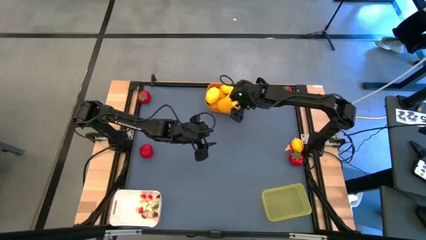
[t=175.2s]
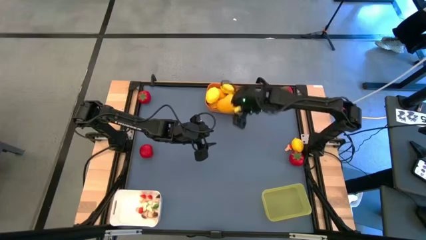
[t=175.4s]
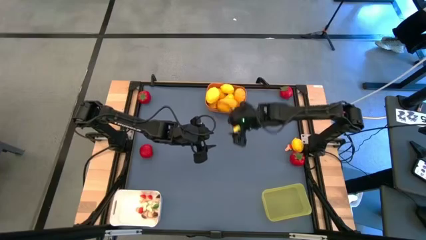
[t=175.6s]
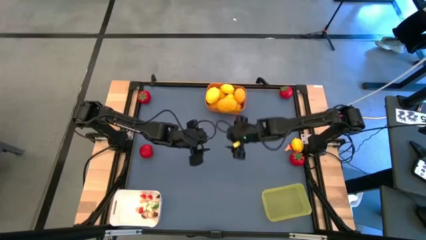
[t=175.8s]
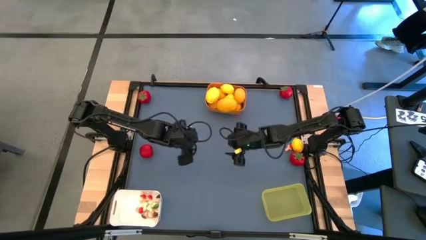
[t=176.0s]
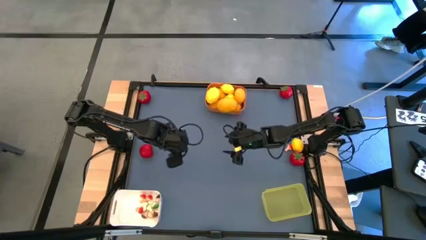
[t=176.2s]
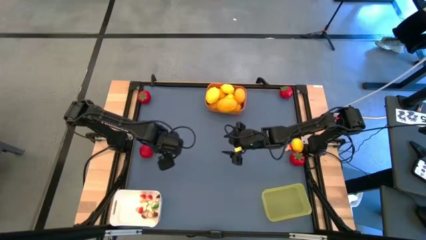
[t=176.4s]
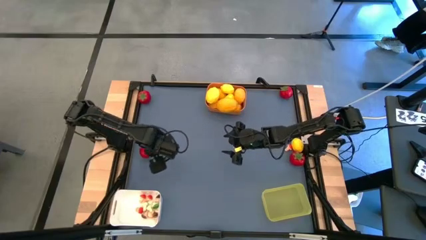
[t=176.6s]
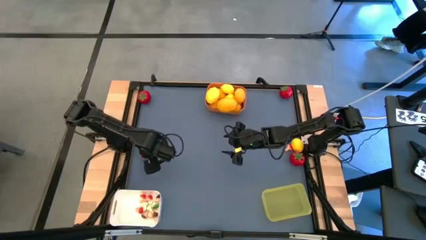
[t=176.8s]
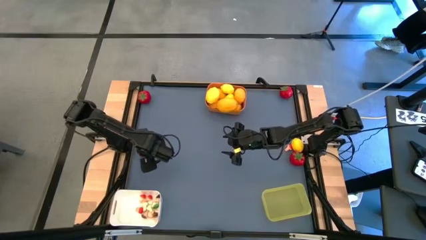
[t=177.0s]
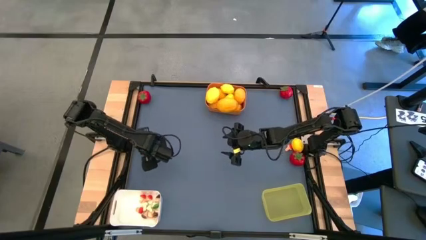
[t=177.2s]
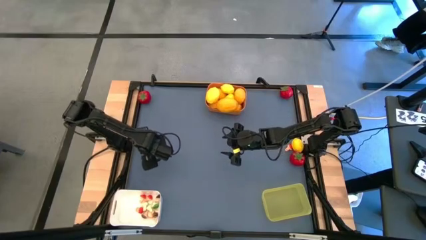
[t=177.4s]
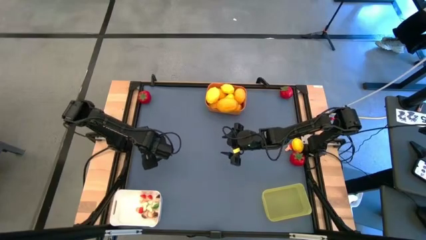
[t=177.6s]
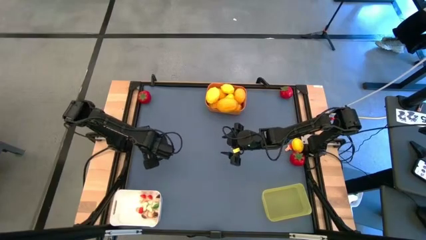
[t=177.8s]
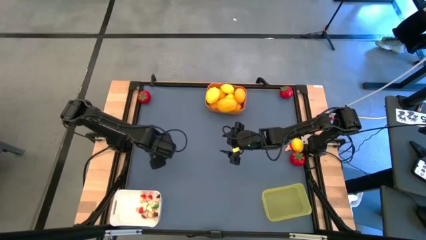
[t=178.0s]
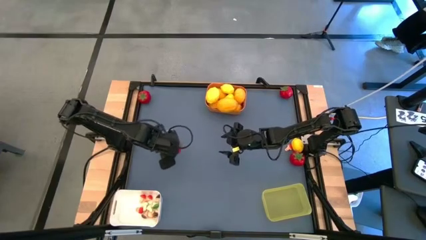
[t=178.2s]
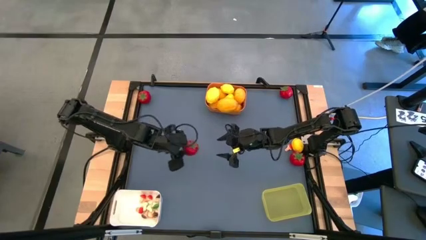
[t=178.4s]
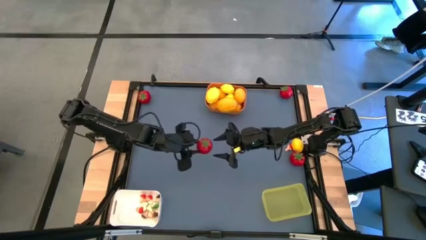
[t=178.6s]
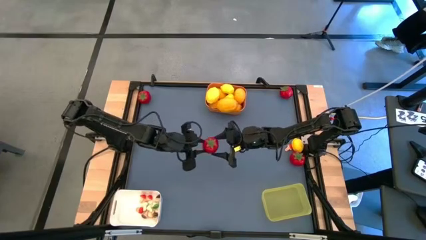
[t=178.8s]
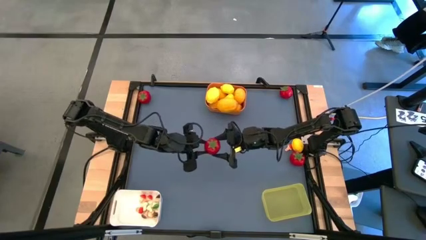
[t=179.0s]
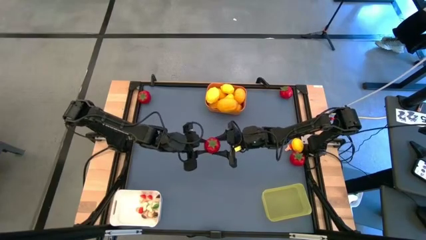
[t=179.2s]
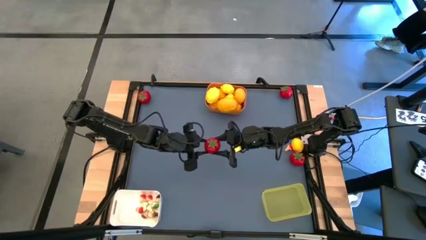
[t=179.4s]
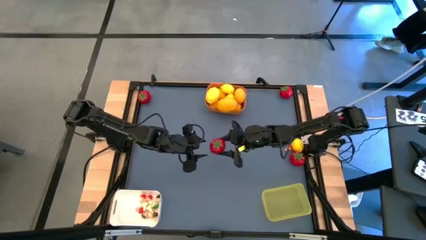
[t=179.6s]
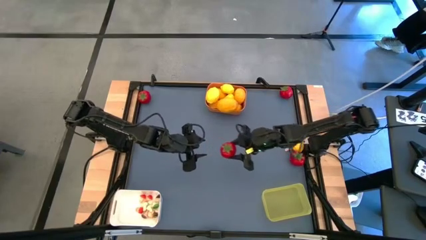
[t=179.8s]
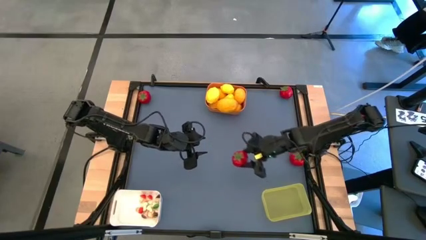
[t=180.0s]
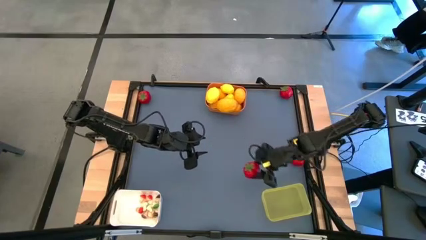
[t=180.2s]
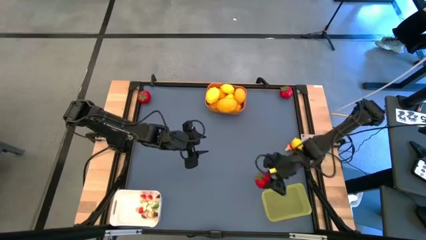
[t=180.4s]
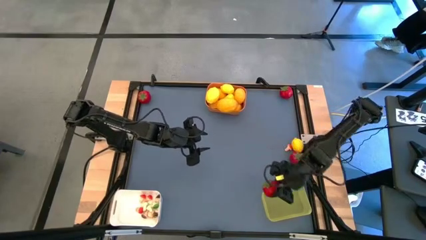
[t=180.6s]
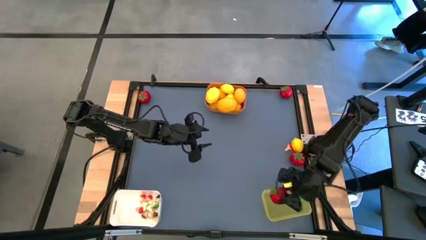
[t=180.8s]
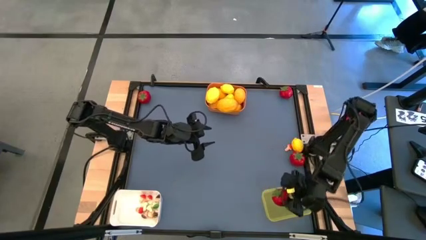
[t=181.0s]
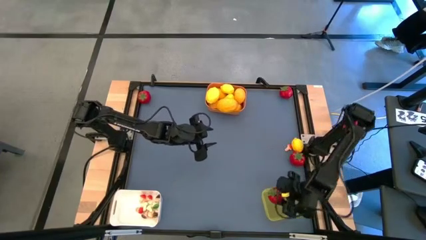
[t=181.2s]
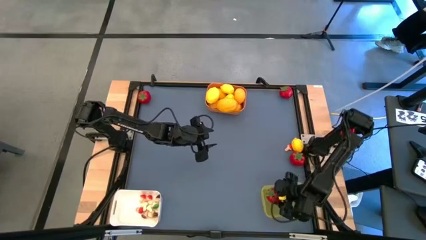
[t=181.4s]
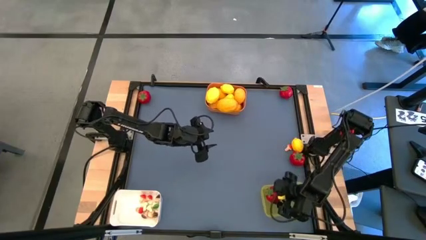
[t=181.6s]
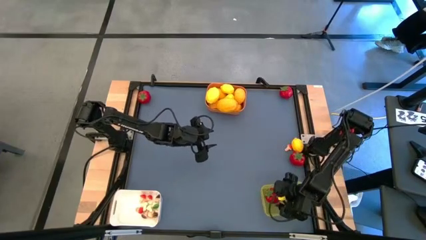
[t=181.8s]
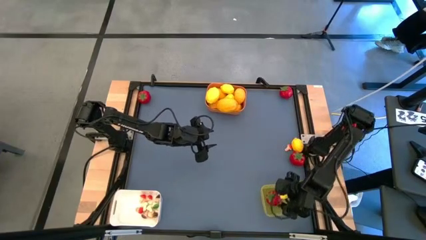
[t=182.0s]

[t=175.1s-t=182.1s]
Task: Sort produce into baskets
Put the red tomato into the yellow bin

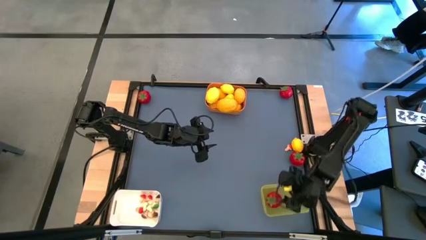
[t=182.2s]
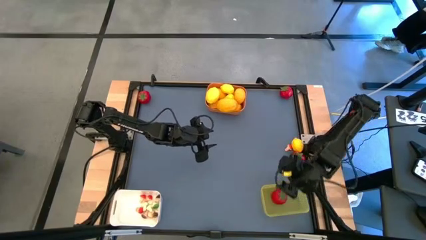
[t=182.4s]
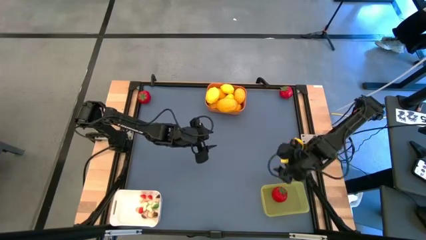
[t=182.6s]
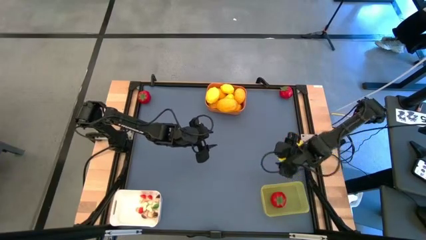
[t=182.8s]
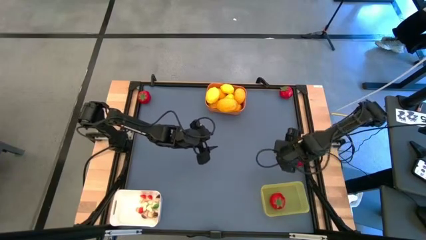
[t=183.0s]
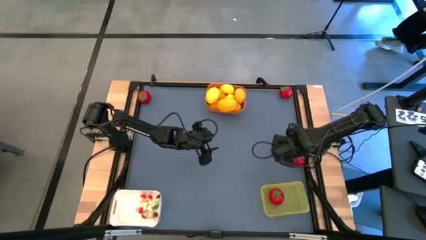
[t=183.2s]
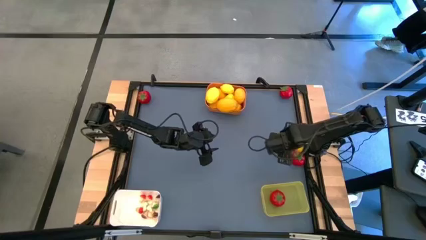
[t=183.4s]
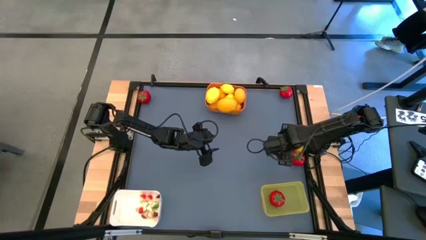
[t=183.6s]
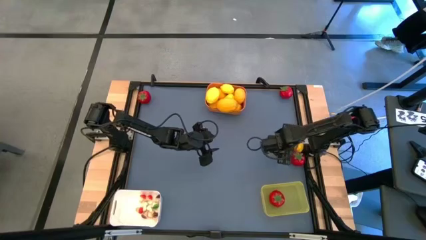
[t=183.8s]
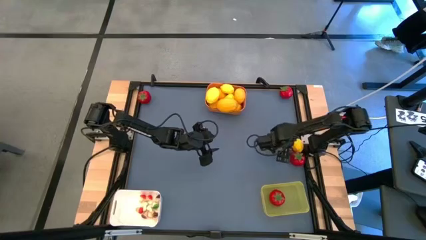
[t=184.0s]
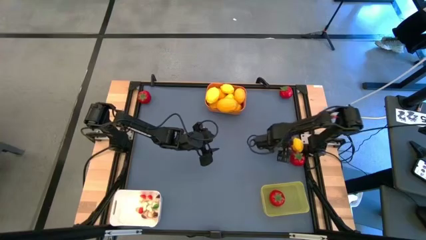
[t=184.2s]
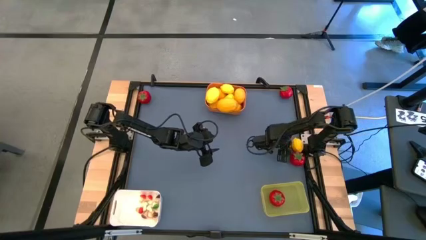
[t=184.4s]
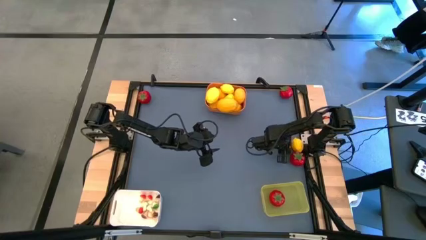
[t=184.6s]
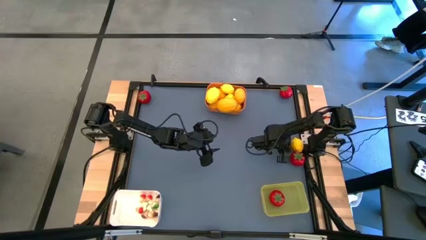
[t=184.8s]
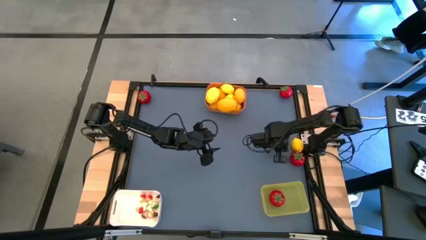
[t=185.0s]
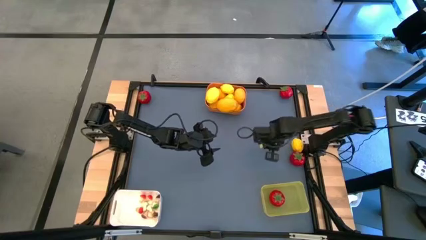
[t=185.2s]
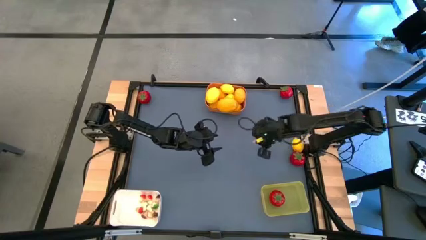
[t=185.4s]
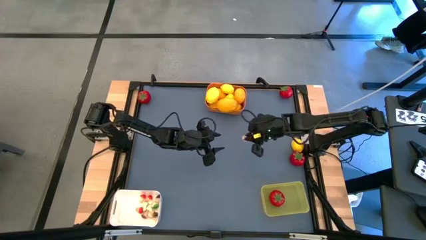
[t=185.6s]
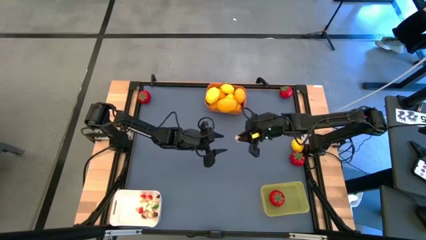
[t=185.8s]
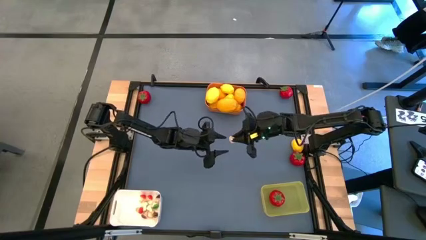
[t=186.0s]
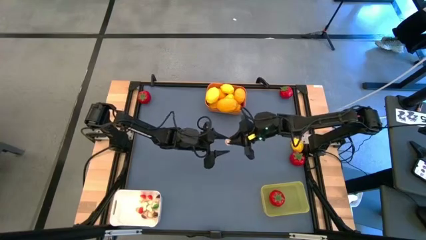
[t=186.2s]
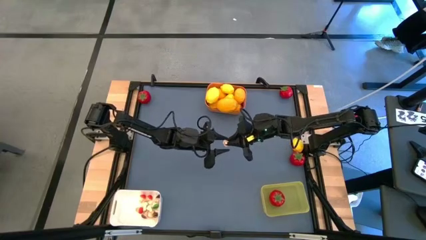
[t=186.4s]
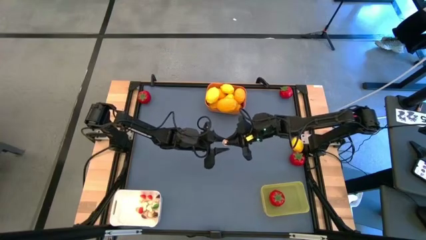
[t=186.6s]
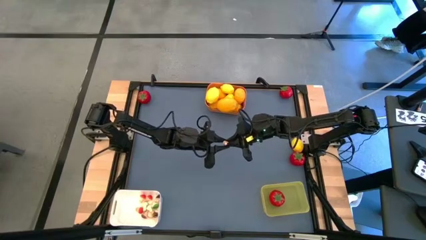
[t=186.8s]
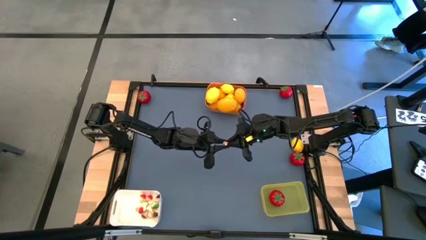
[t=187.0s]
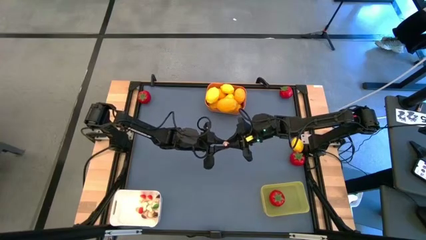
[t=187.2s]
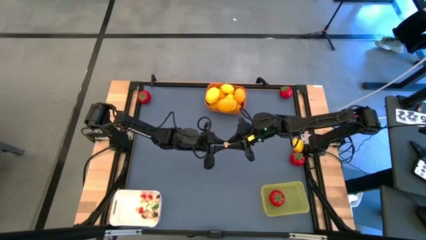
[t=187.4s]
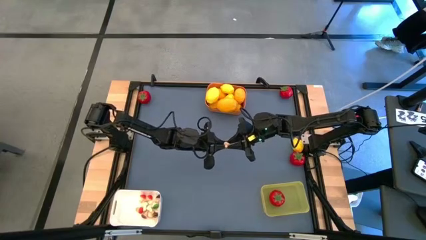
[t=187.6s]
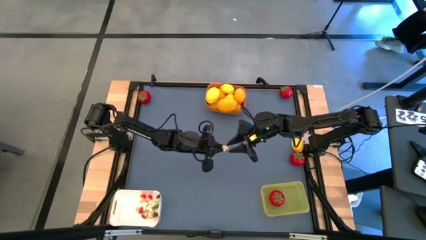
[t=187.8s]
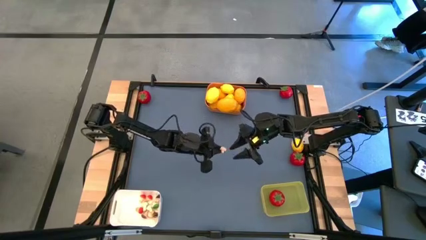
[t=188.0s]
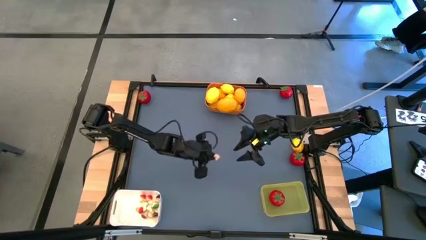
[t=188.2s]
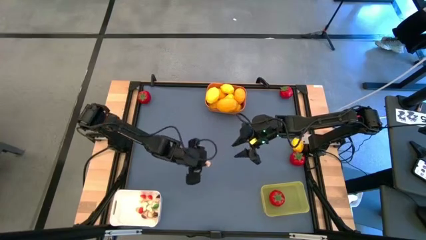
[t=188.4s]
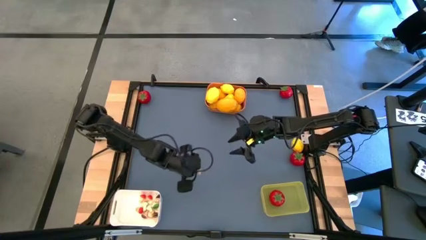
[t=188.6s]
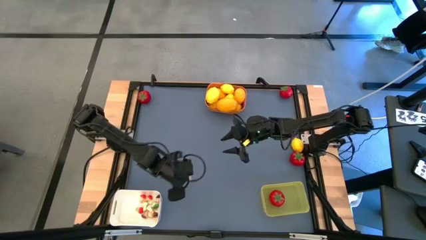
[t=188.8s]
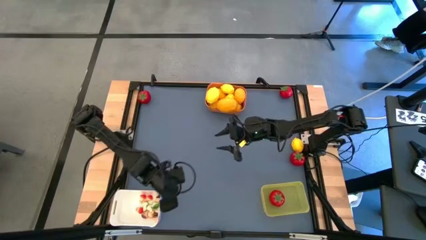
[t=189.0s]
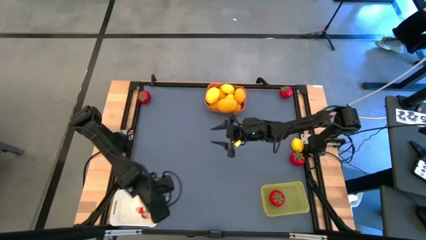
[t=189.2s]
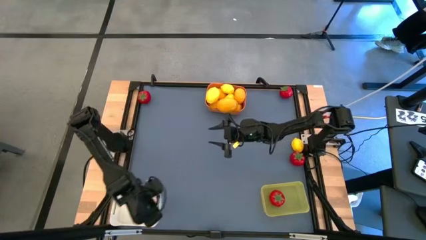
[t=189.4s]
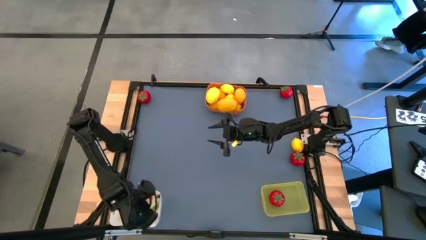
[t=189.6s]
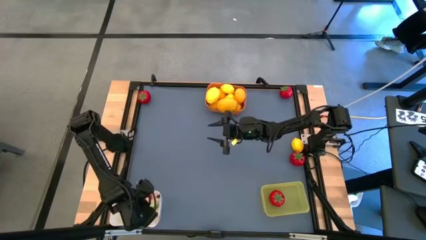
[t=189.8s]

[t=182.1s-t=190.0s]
Put the red mushroom into the white bin
